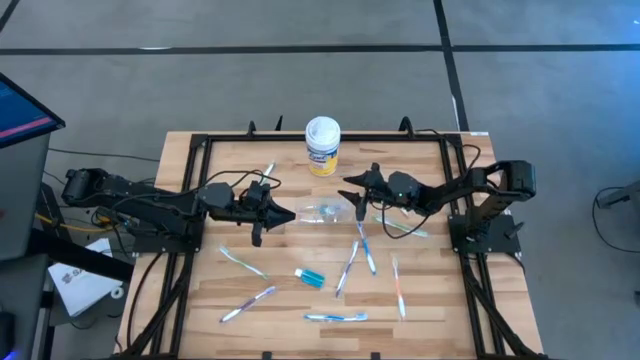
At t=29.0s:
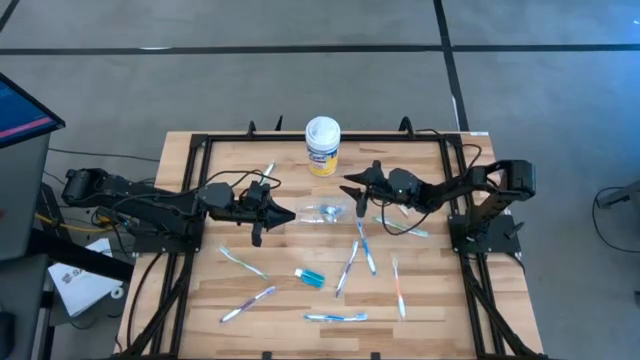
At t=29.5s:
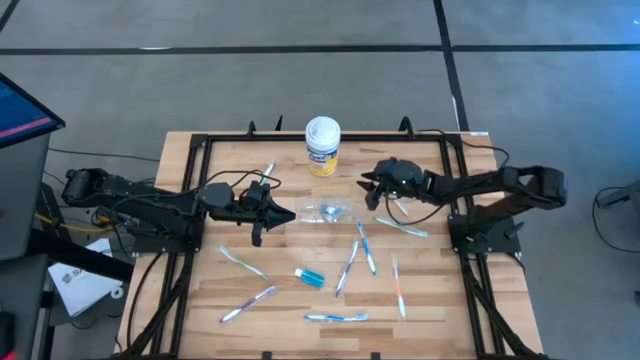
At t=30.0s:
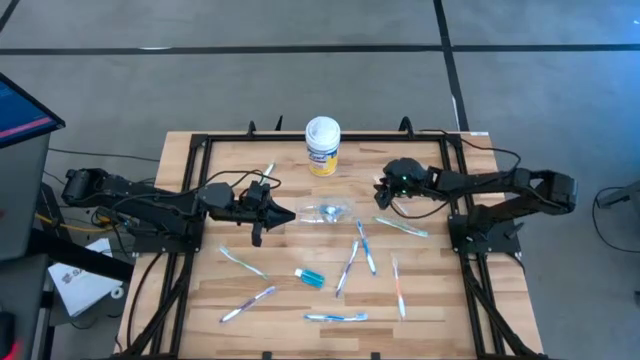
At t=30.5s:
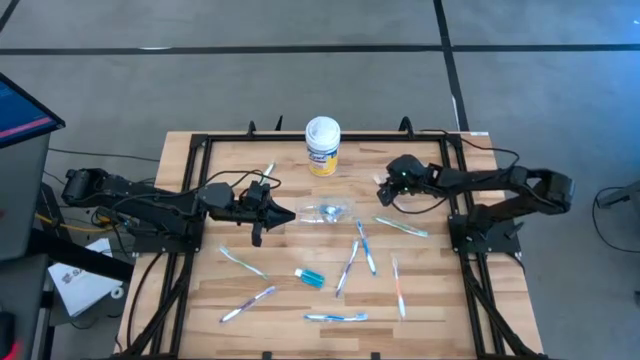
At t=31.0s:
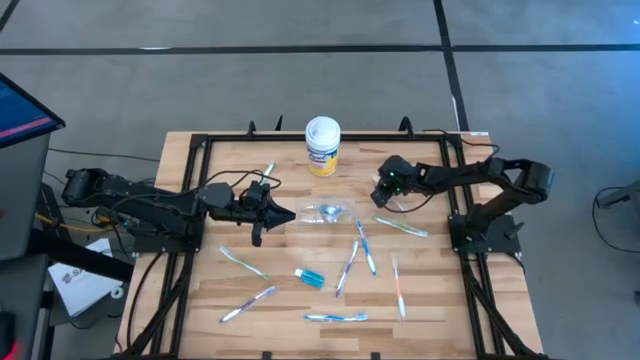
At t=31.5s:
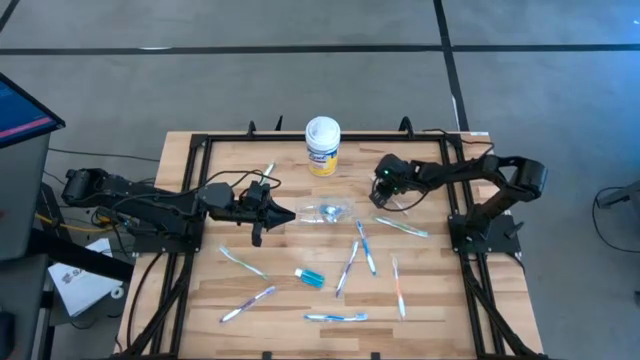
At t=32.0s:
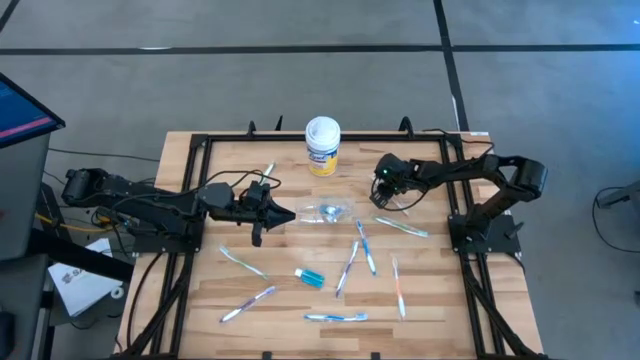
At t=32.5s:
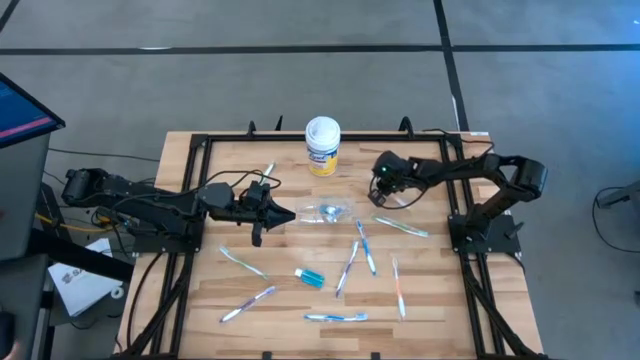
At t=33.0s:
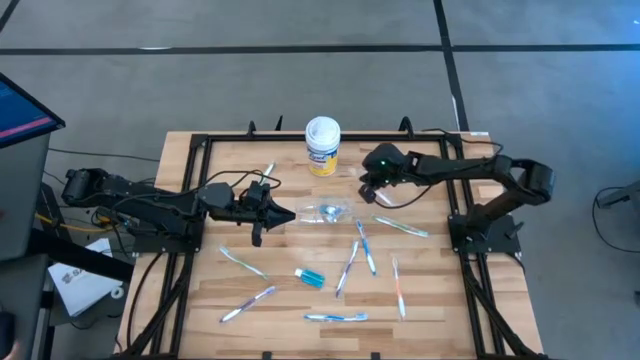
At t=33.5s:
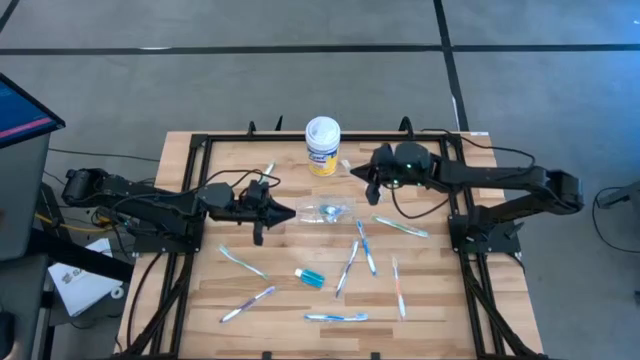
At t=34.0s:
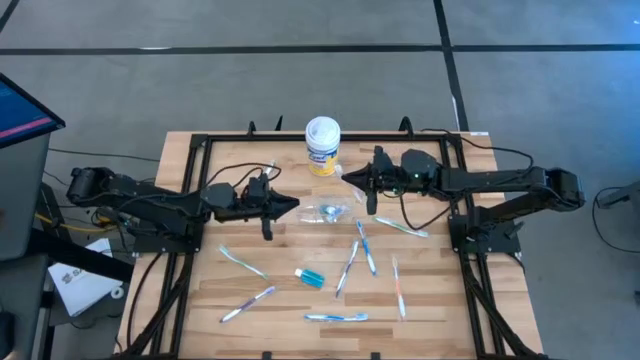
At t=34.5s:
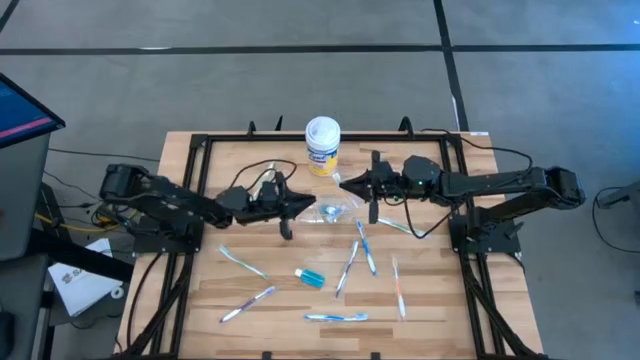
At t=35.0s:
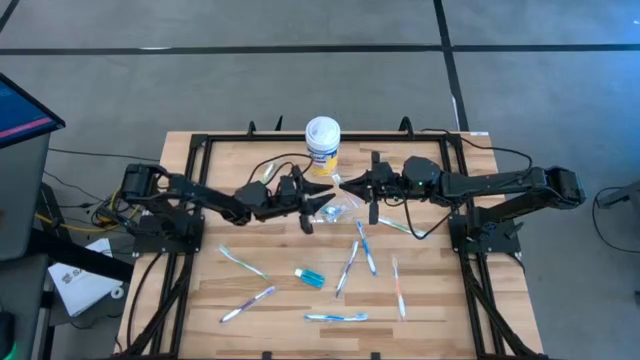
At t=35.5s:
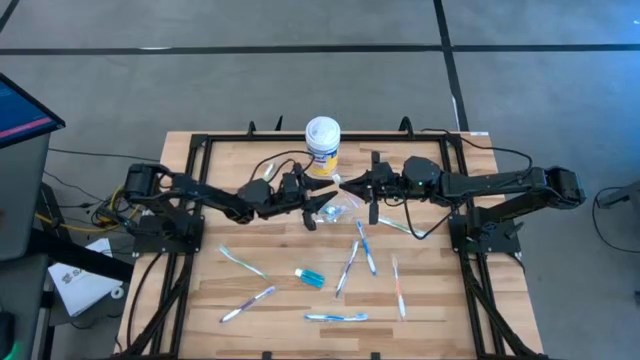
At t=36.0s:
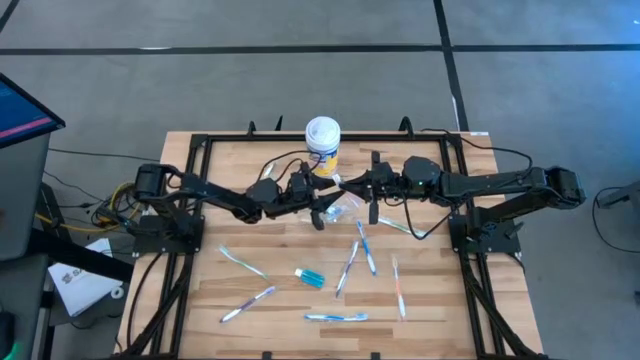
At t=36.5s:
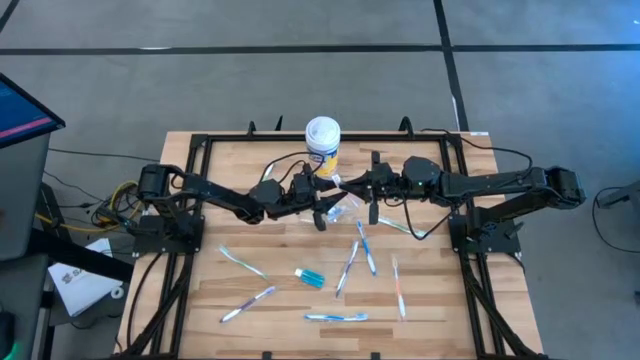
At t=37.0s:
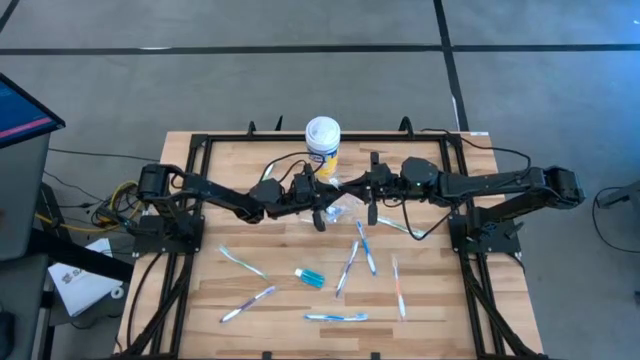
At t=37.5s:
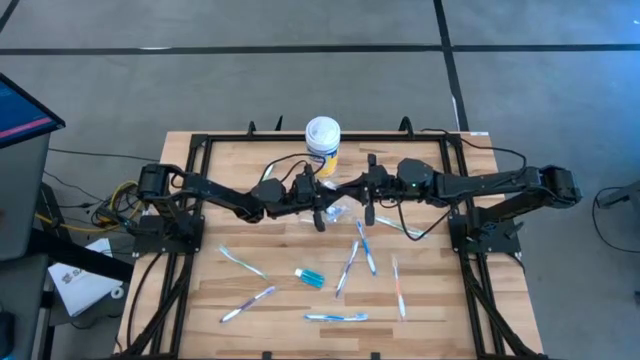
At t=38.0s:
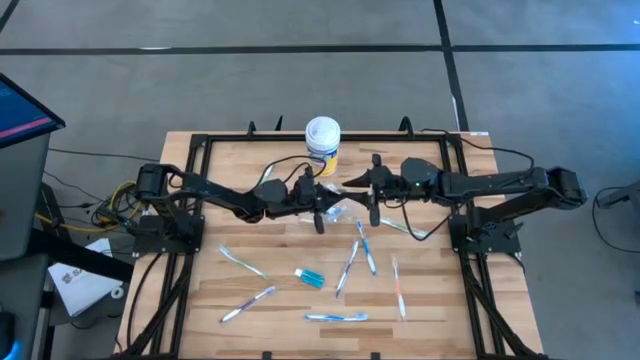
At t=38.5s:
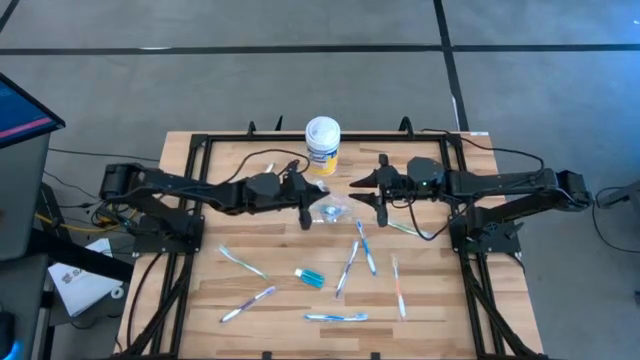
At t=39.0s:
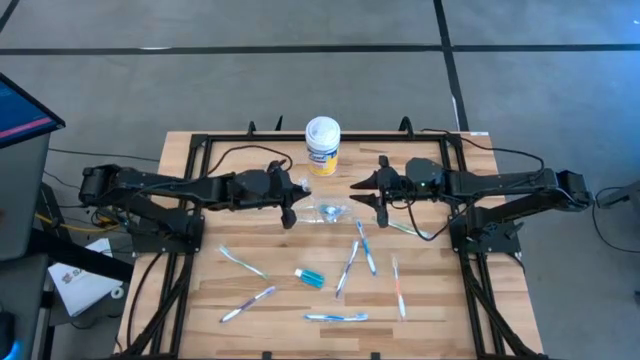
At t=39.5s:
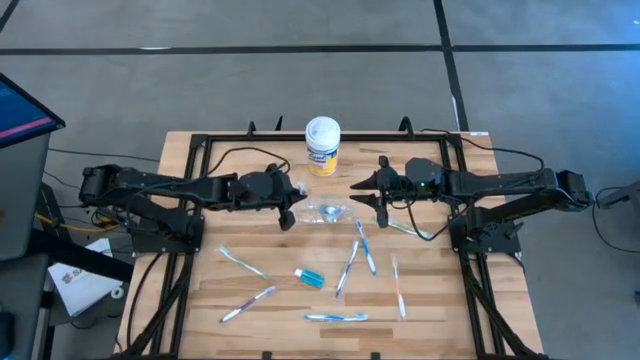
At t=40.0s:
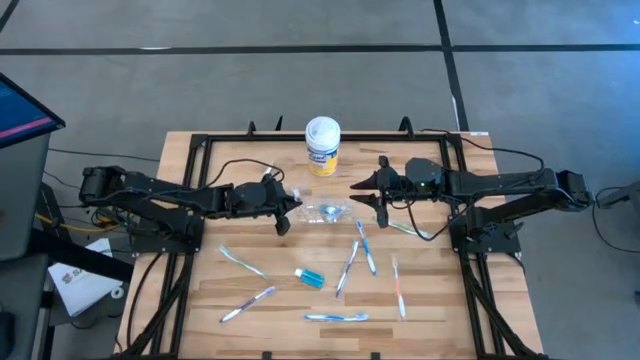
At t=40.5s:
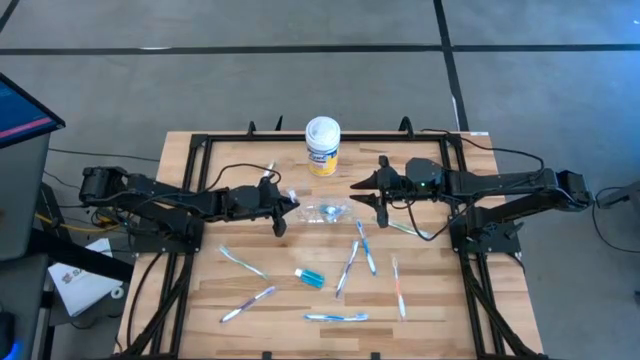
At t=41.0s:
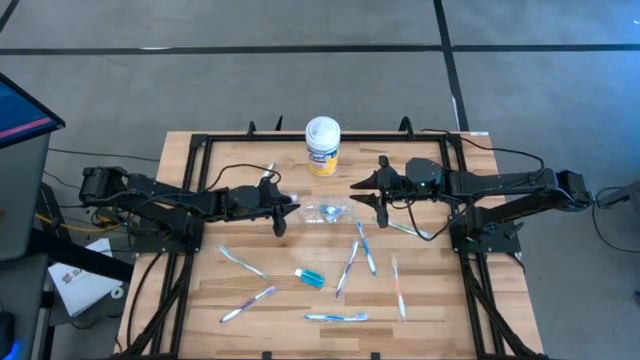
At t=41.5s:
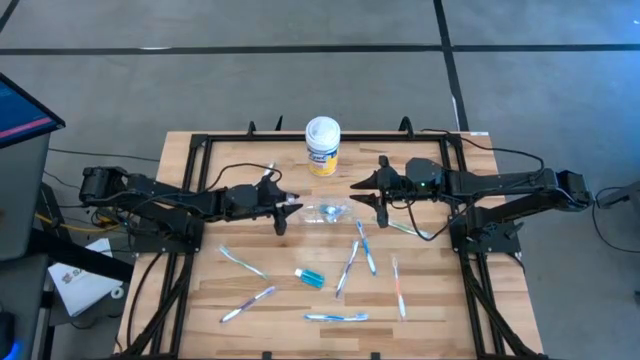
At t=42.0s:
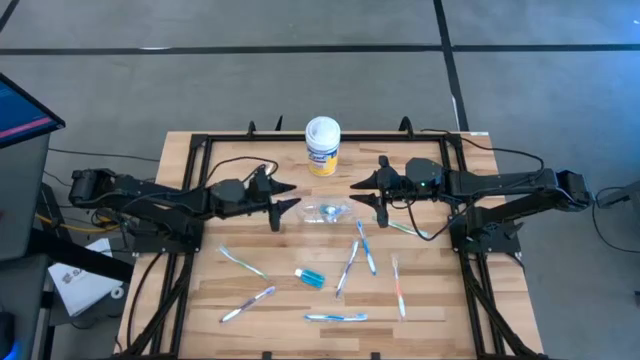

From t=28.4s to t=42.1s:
Task: Pick & Place toothbrushing station
Put the top orange toothbrush into the transparent organizer

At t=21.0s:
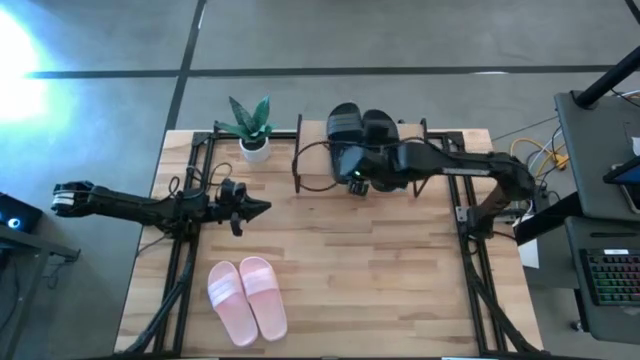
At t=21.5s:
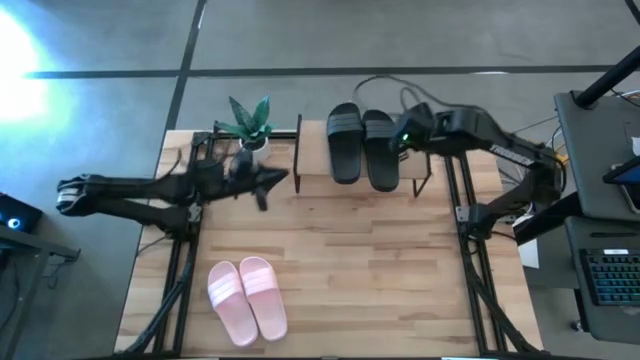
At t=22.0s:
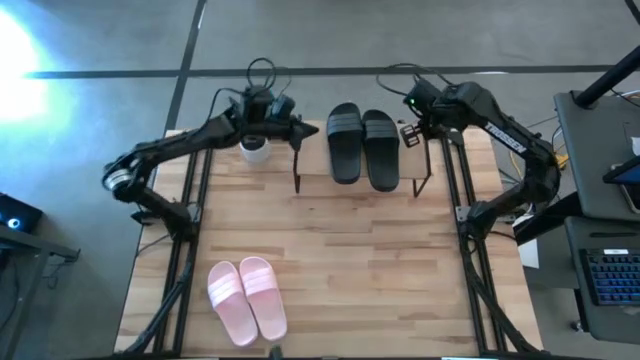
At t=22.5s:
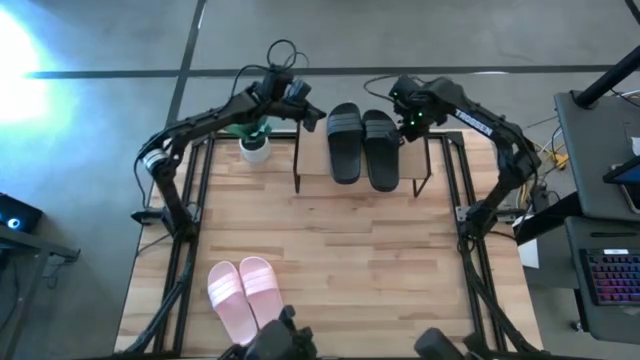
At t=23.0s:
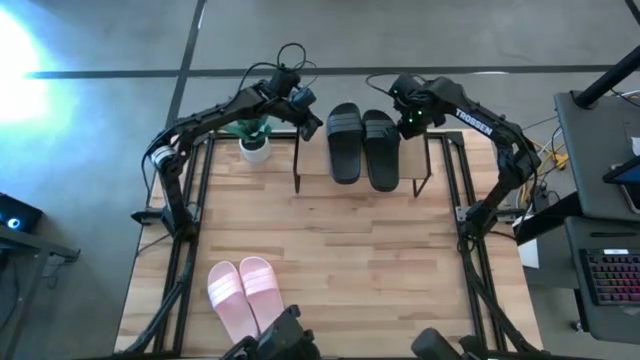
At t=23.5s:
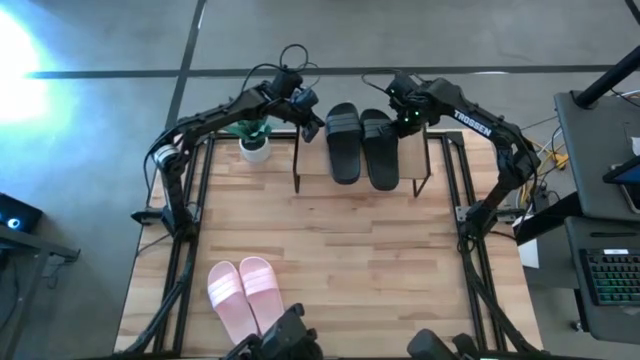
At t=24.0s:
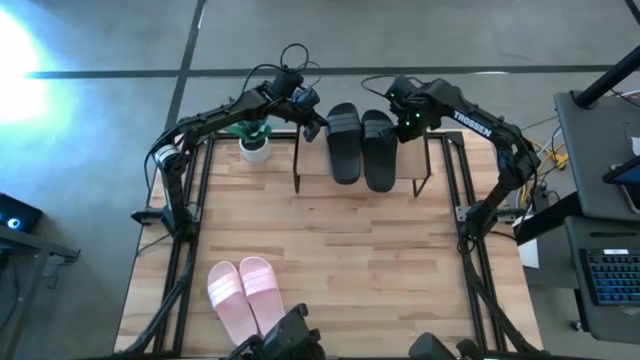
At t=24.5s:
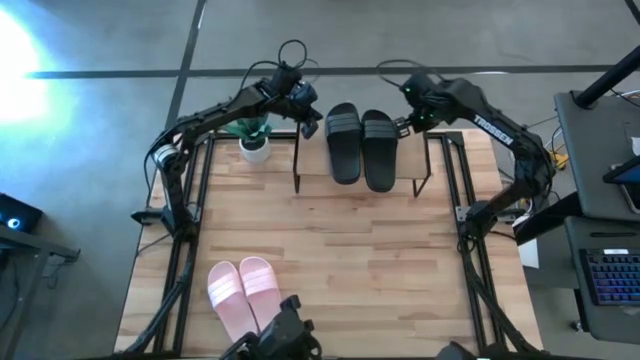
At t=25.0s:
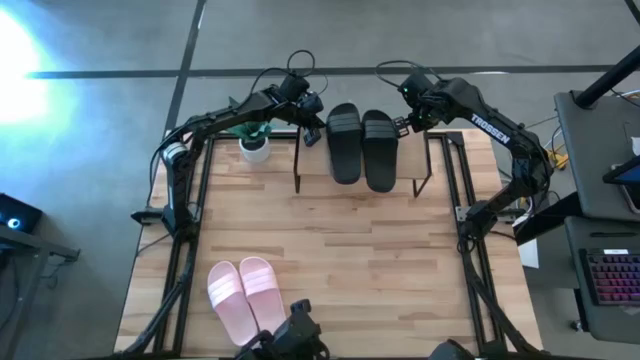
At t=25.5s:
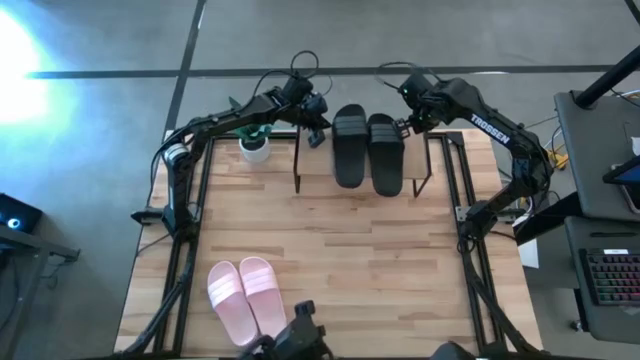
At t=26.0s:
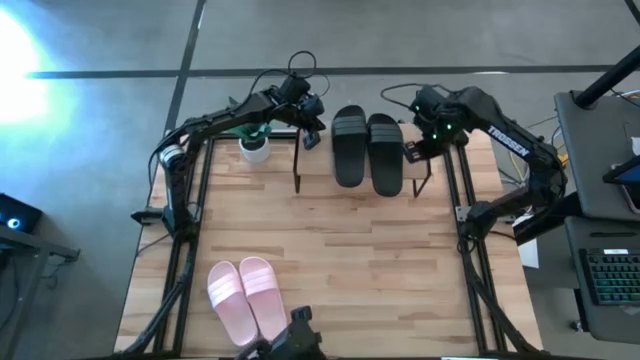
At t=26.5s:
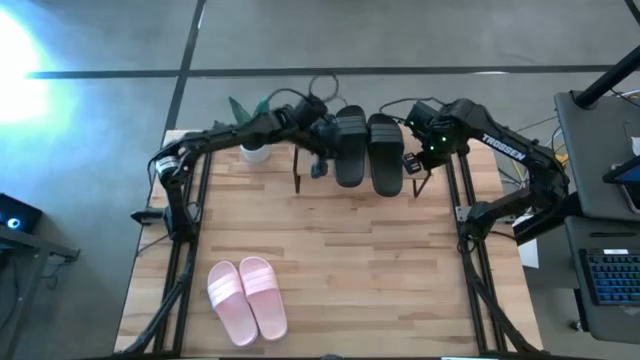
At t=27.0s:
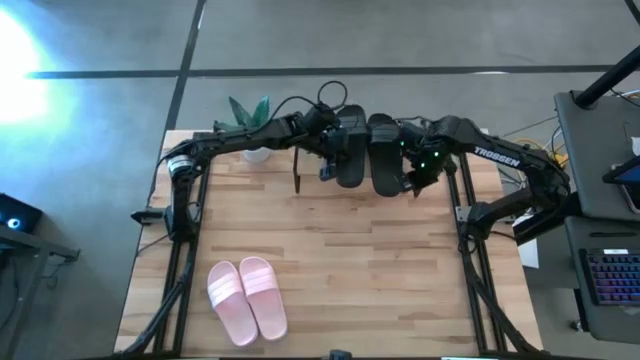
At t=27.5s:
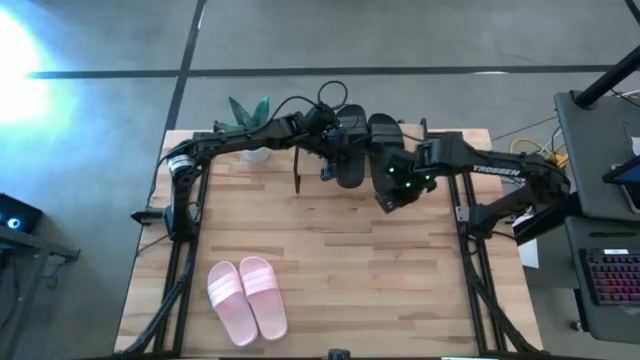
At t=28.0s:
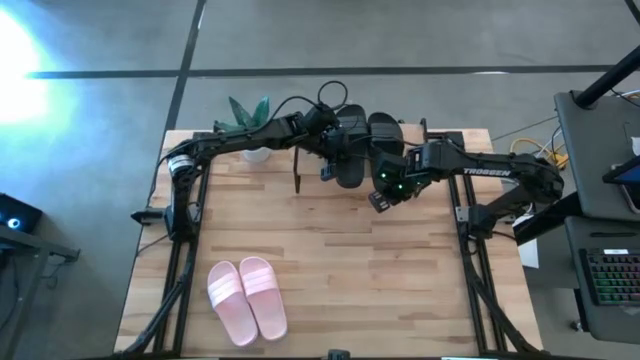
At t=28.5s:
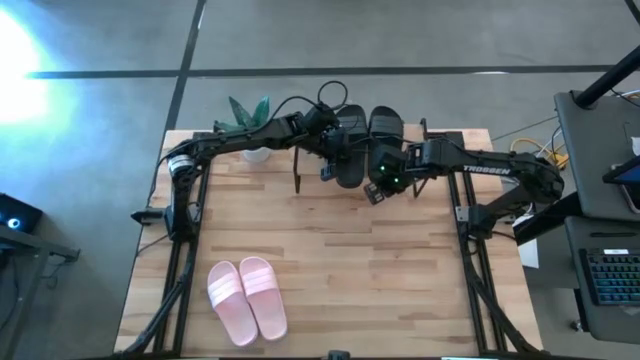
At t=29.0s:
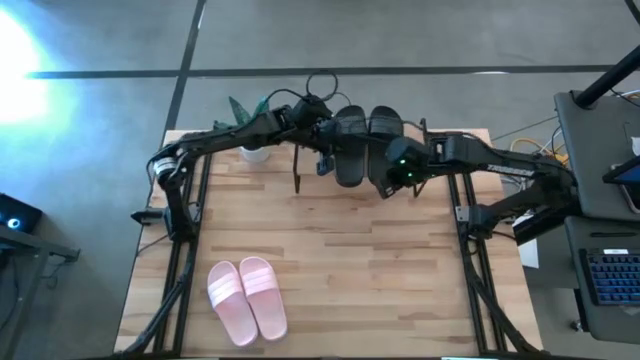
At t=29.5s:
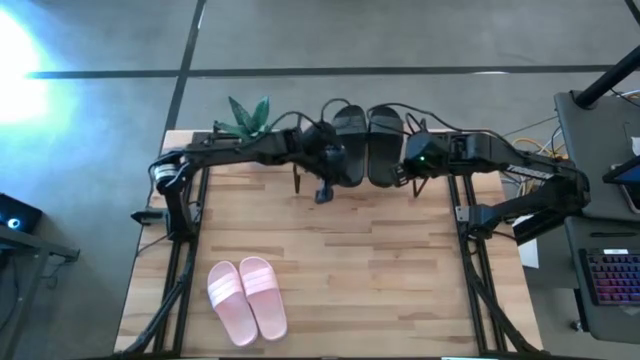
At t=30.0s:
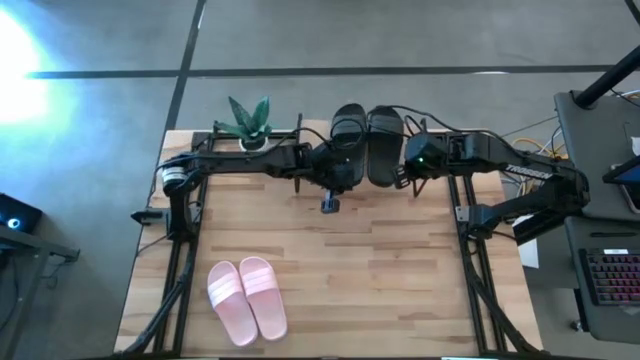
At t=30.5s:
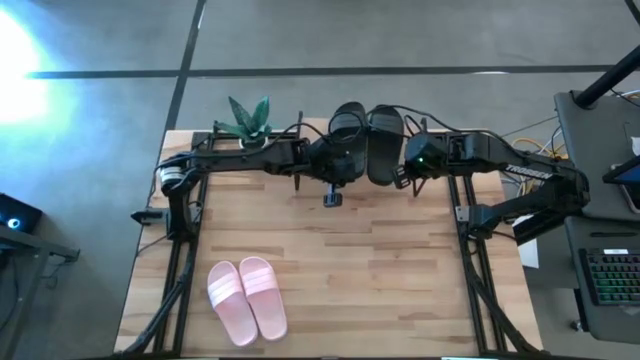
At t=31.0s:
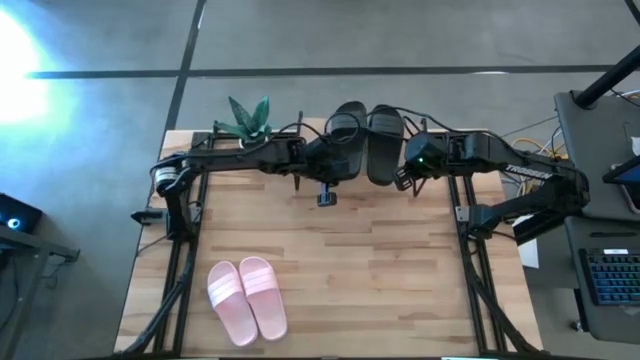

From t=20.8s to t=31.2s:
Task: Pick and place slides into the shelf
Adjust the pair of black slippers on the shelf
